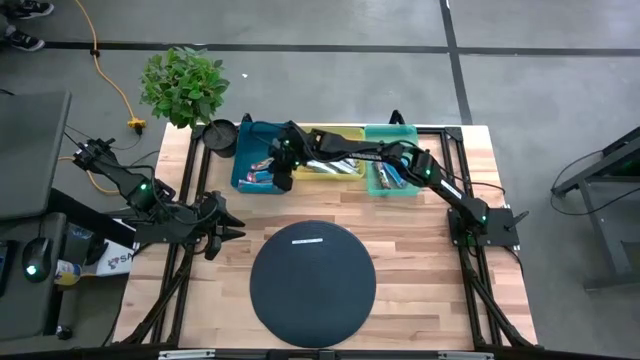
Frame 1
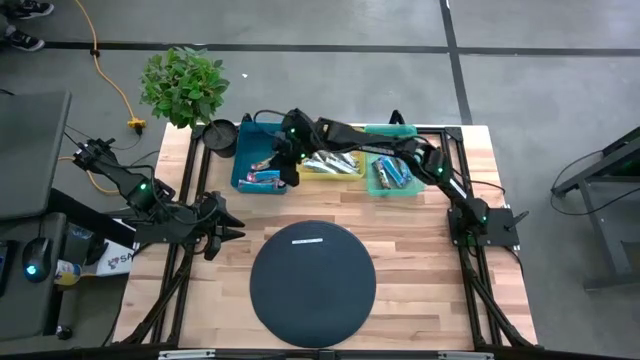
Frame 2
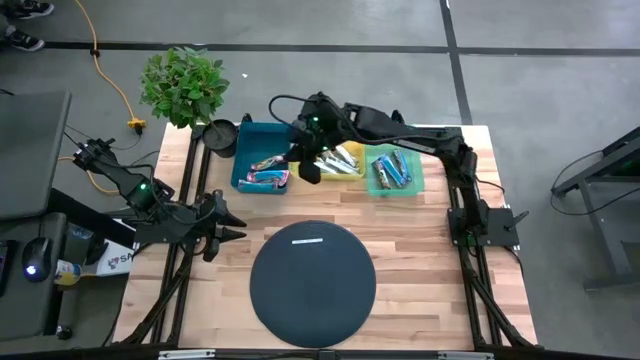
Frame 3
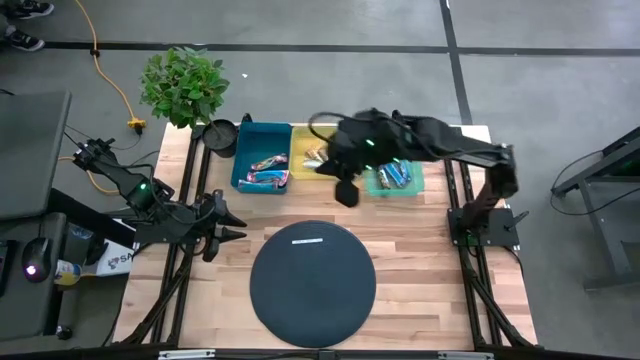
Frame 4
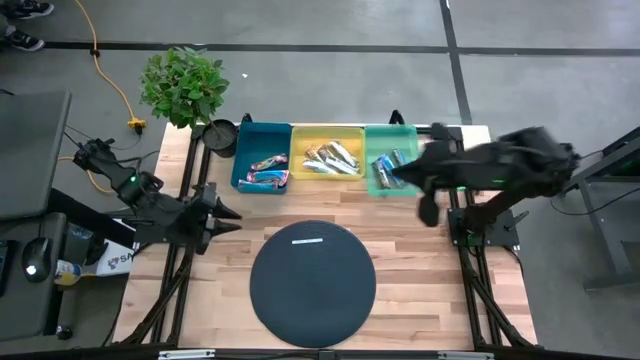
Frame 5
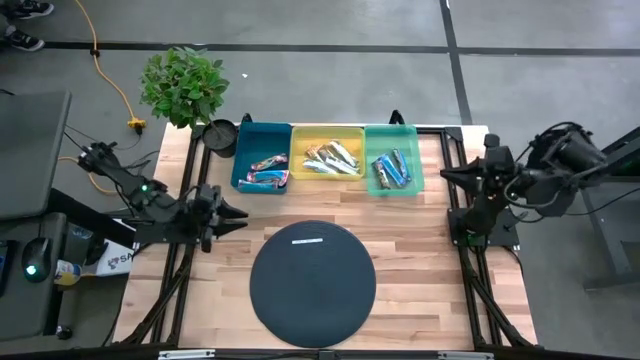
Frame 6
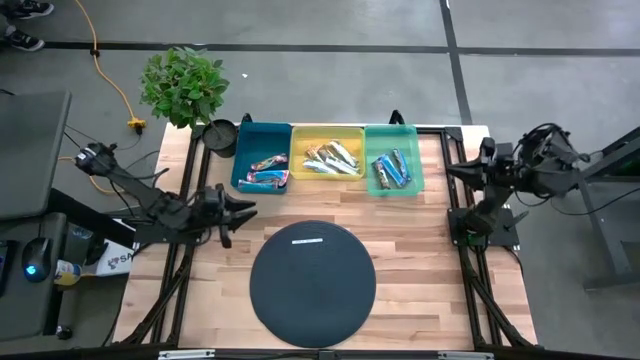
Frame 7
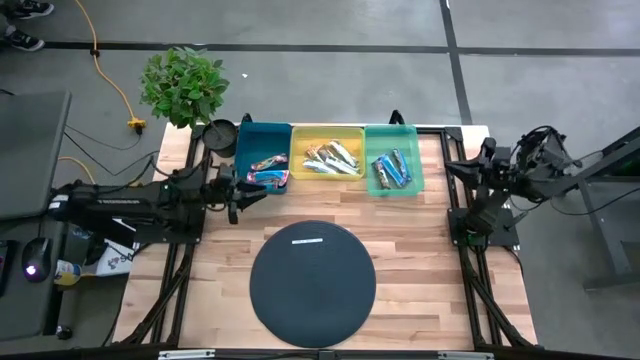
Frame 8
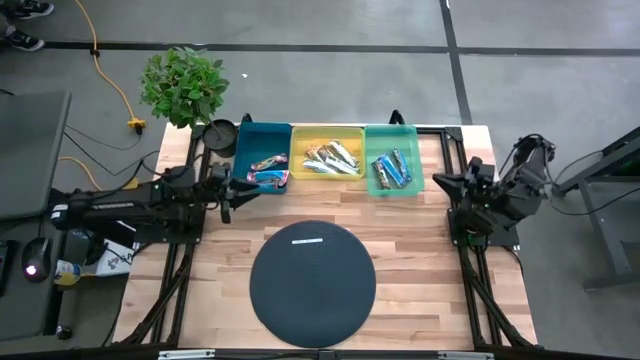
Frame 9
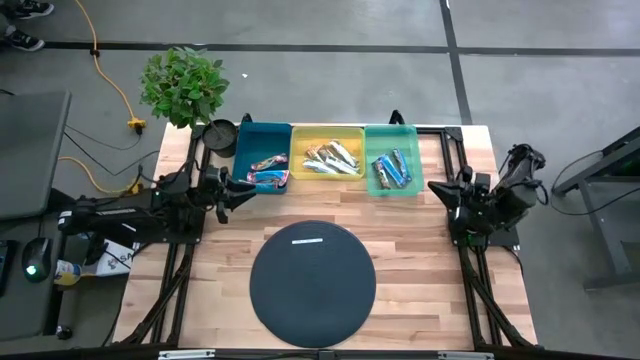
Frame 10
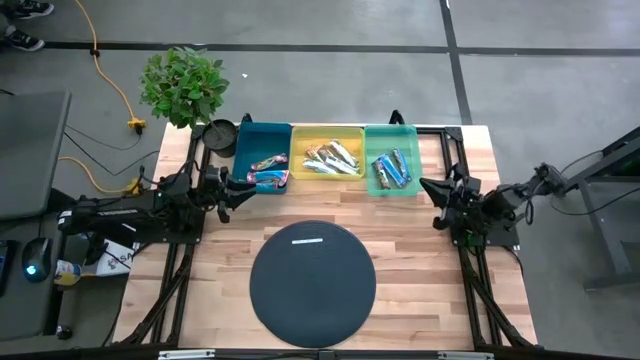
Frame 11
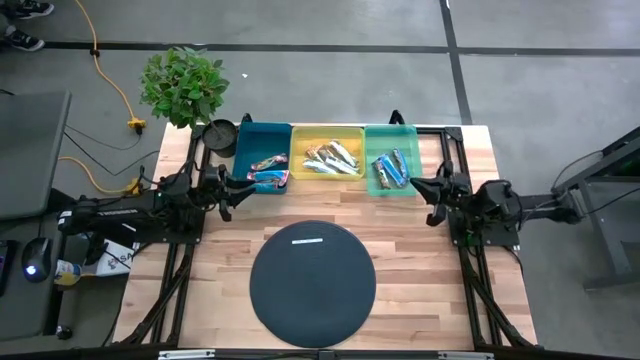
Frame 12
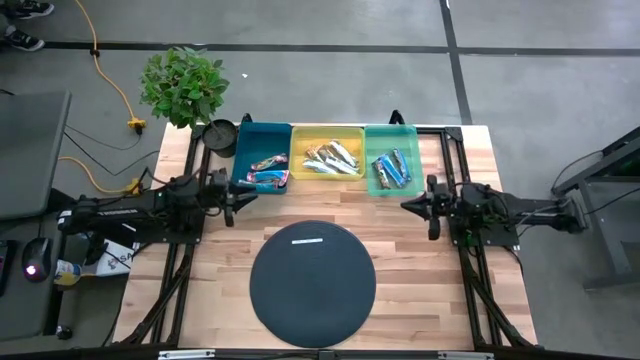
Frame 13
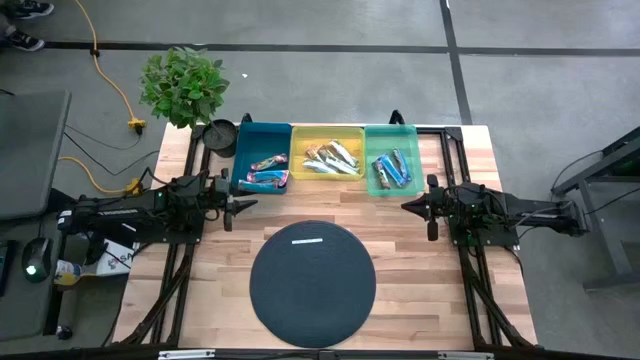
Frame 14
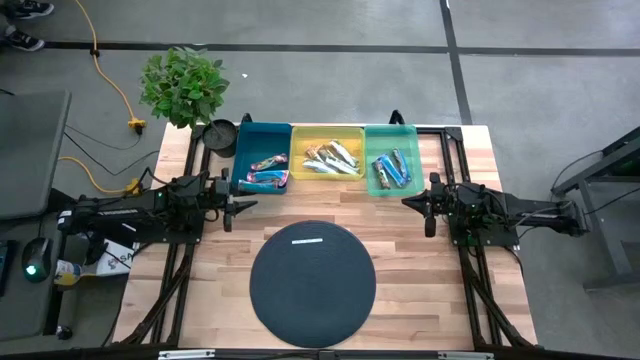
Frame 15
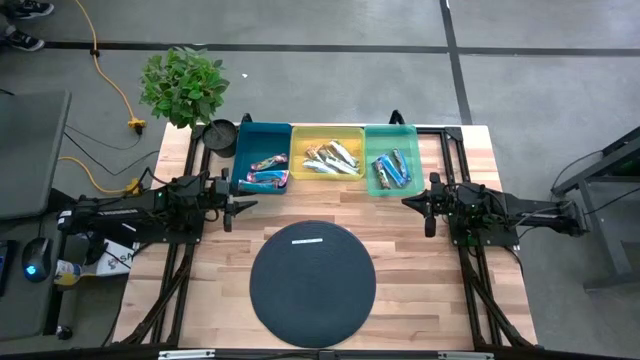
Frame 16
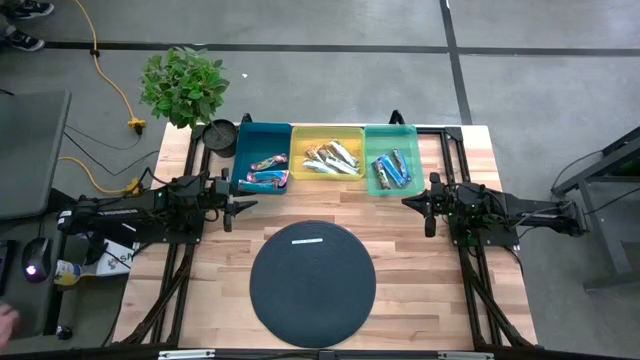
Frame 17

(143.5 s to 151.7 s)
Task: Pick and place Granola Bars by type
Return to Home Position

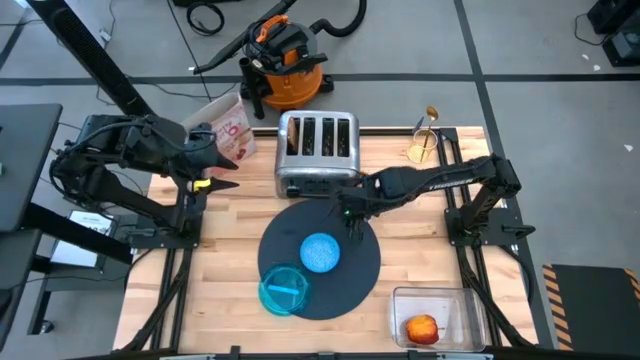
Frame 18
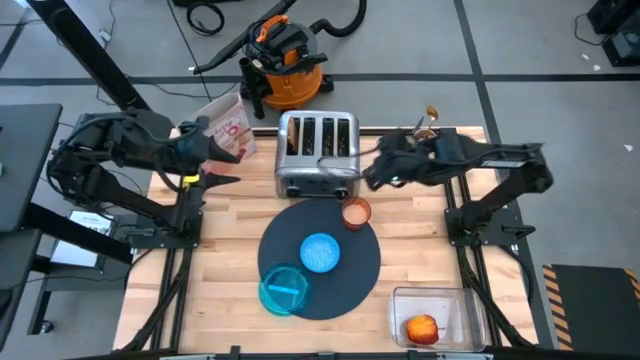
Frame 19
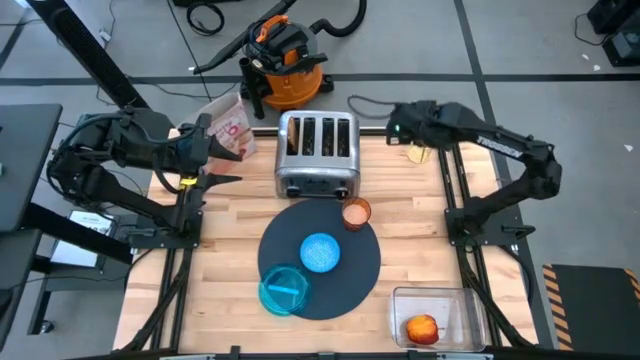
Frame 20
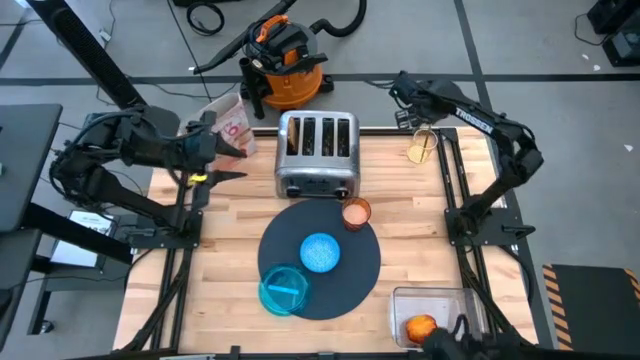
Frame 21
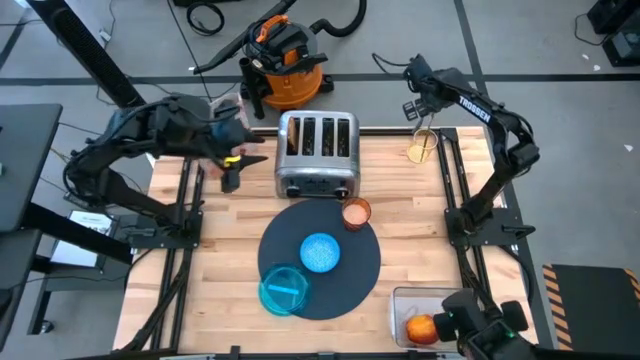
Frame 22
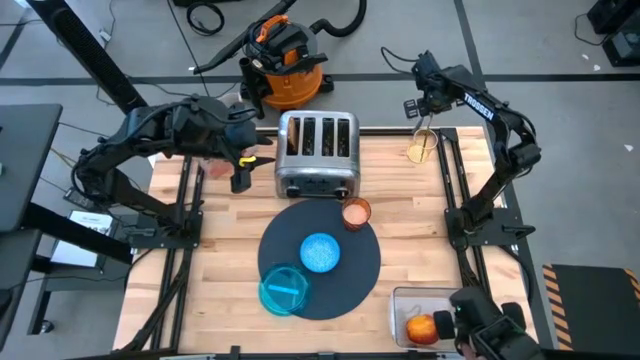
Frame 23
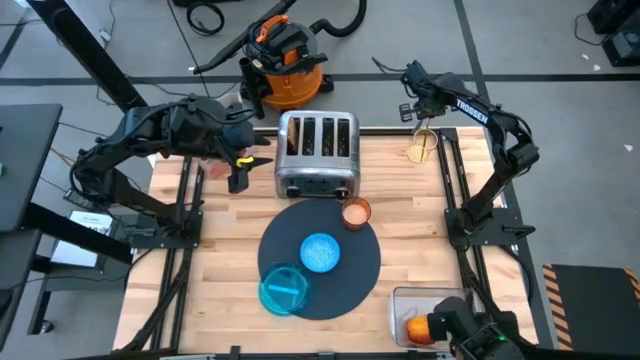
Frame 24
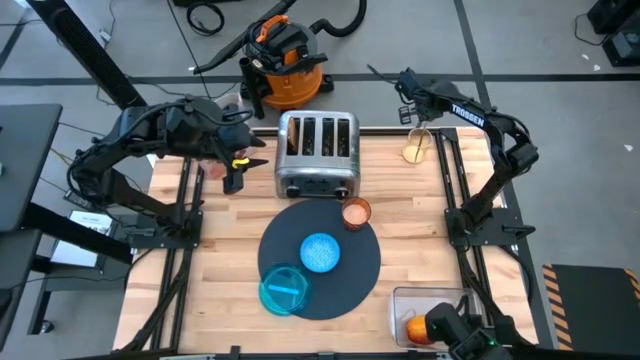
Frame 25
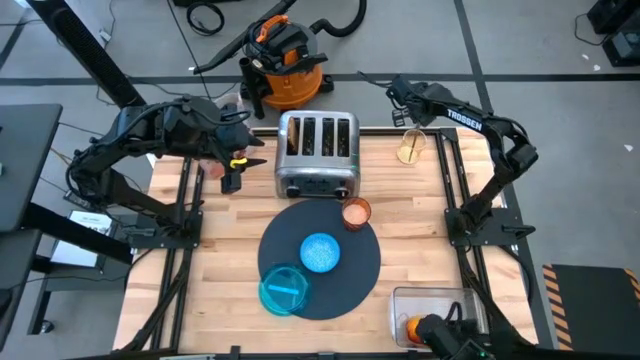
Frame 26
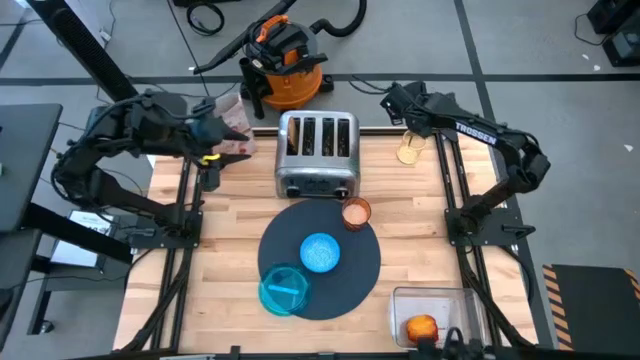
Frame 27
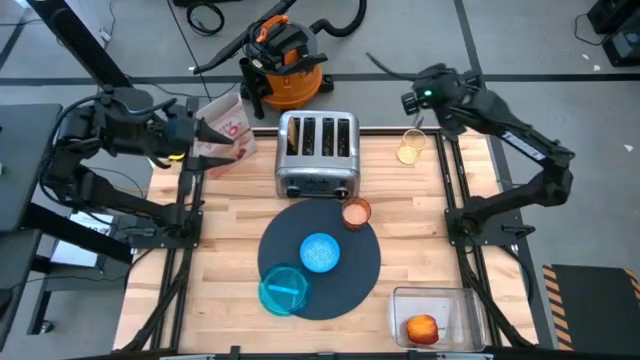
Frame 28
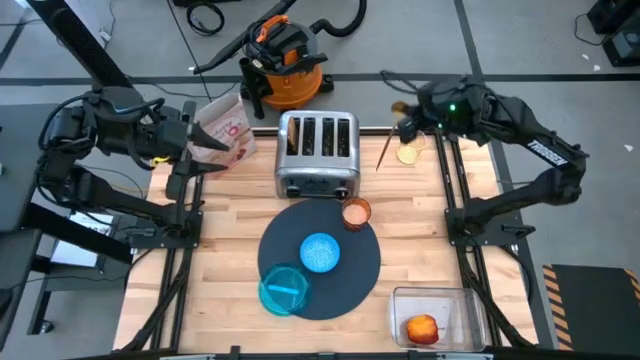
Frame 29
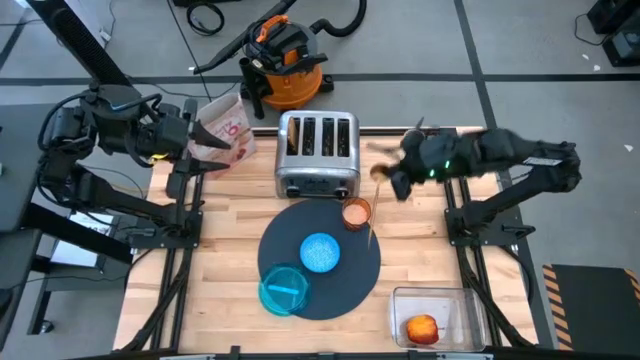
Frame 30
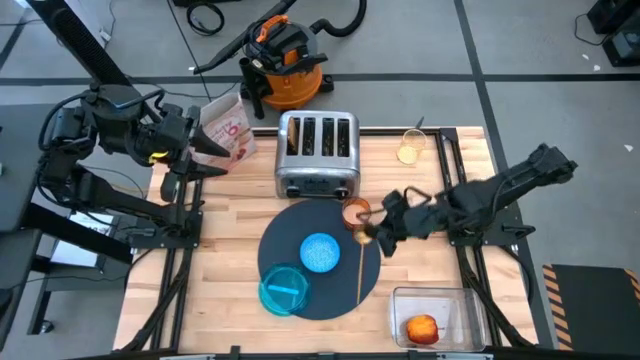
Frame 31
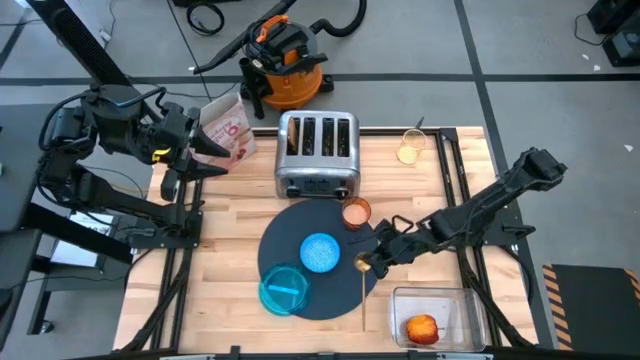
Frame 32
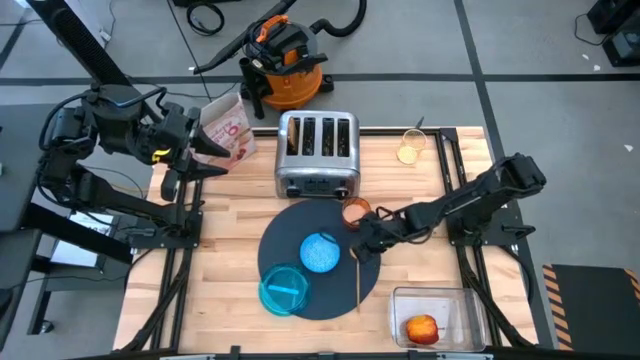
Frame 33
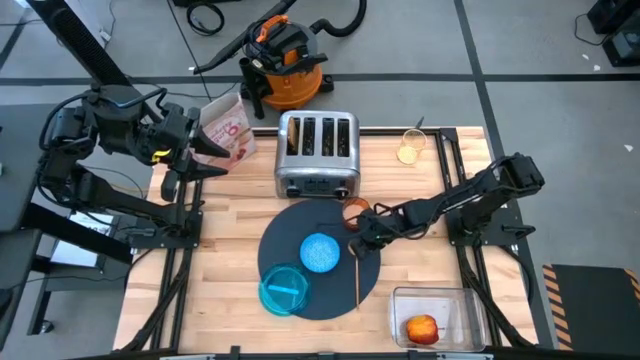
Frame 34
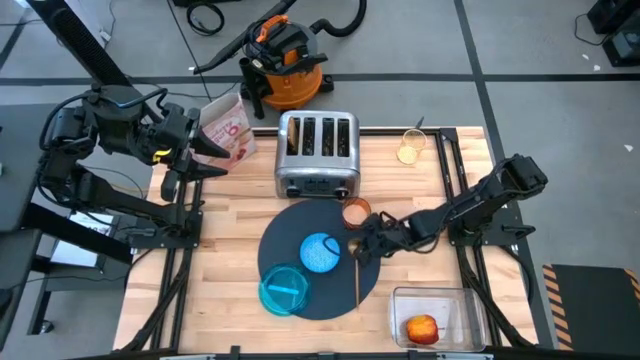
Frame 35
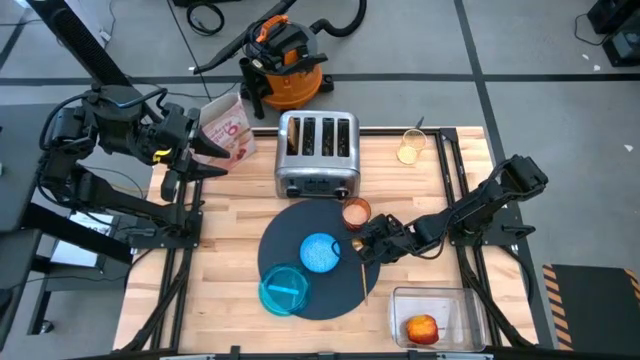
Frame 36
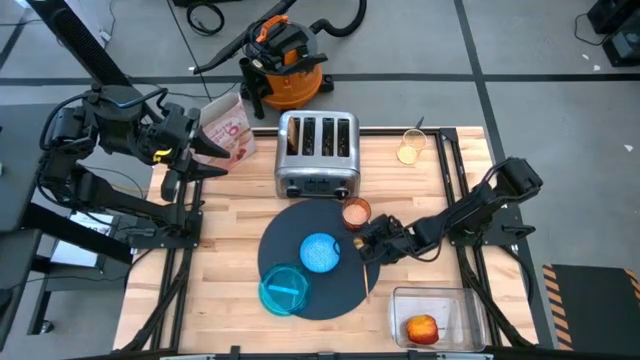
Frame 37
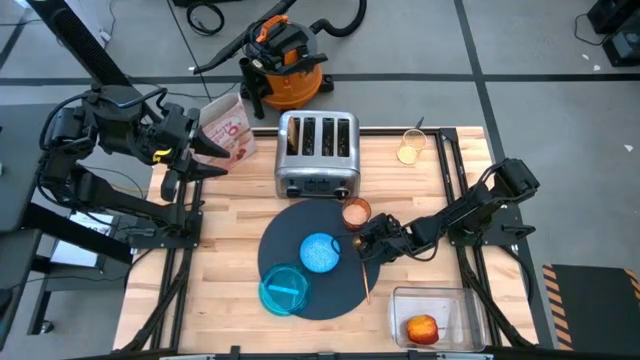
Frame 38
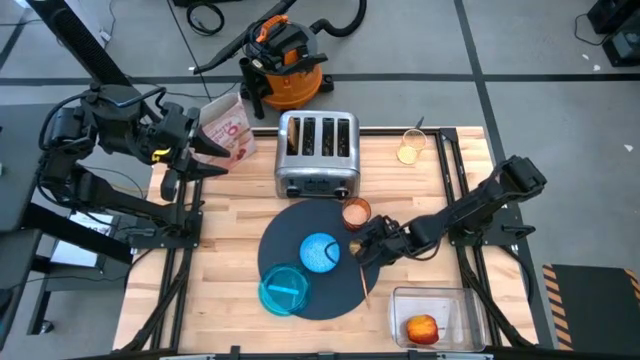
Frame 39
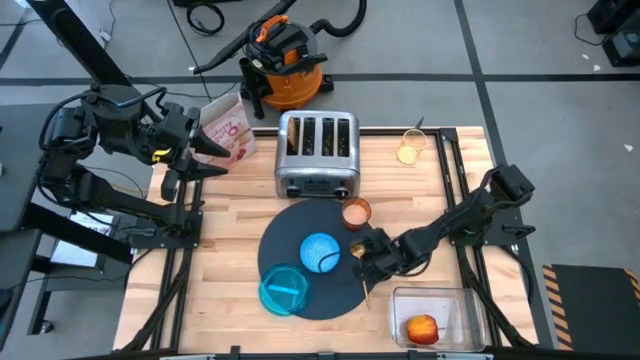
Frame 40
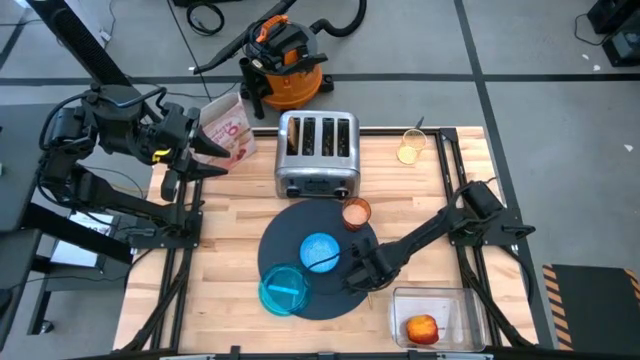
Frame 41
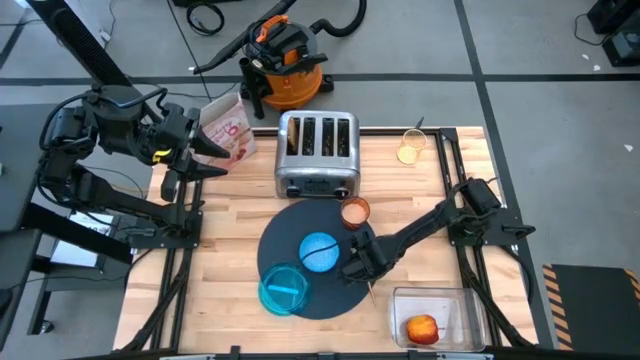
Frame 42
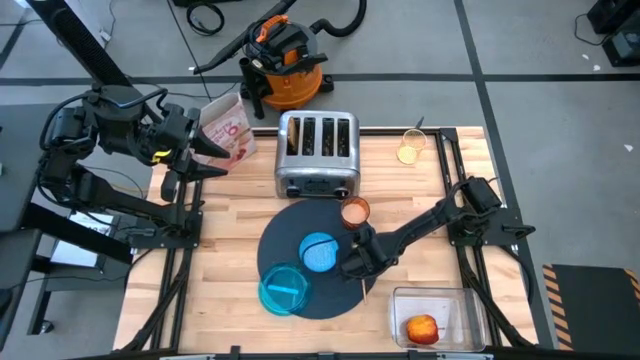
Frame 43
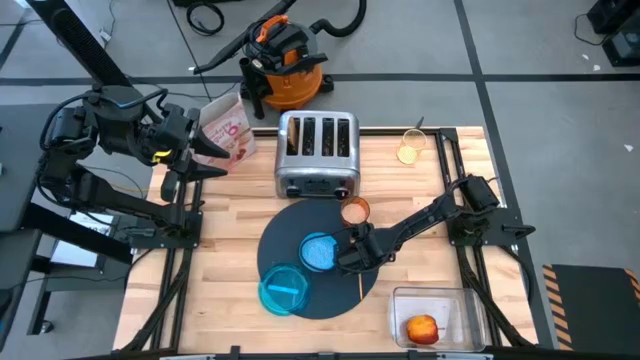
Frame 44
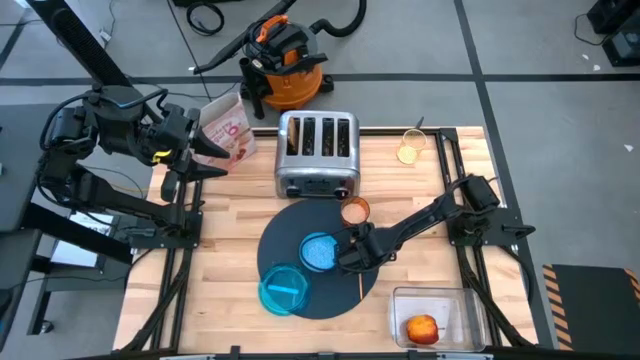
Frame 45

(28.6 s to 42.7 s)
Task: Arrange a breakfast setting
Put the gold spoon on the right side of the blue bowl
